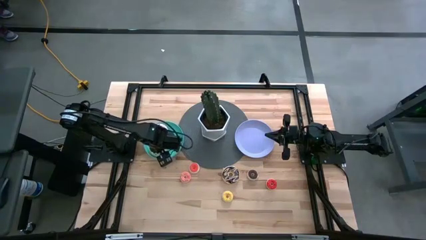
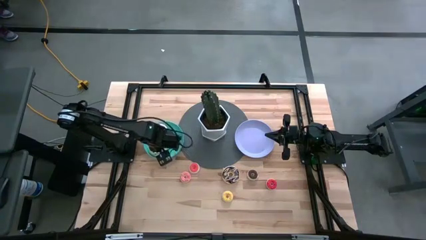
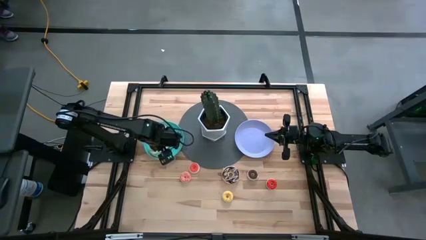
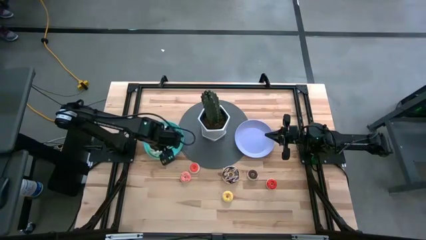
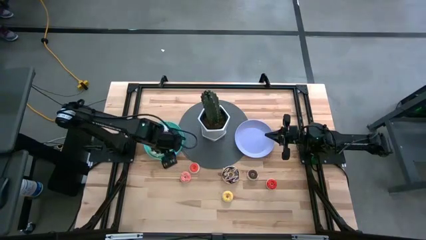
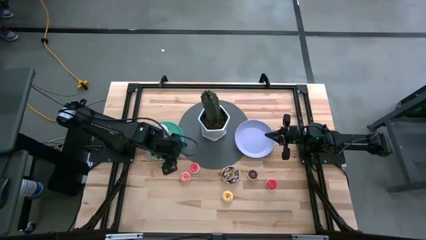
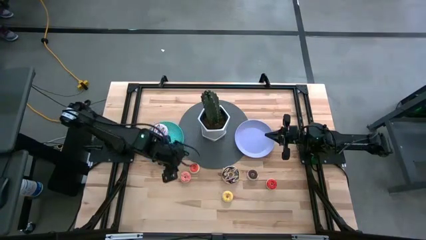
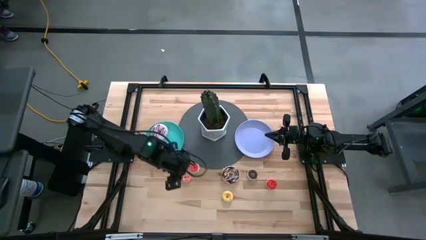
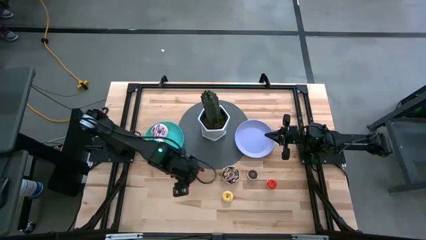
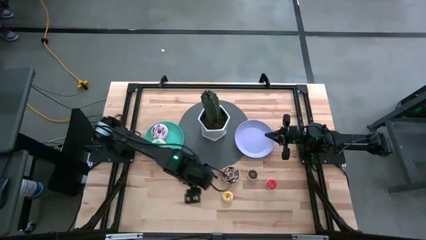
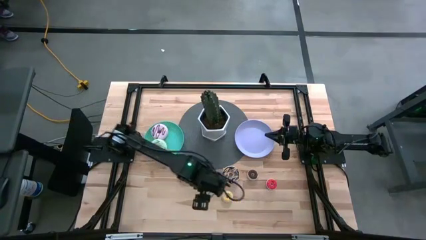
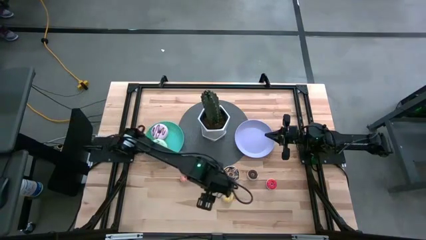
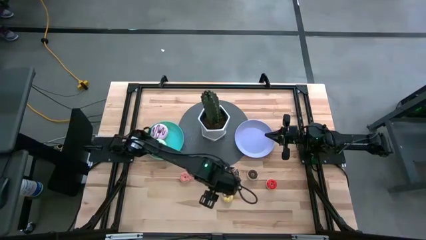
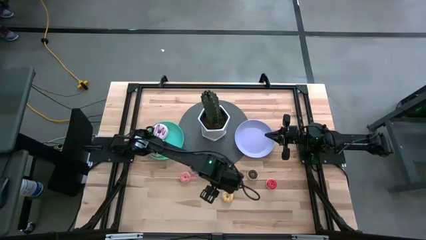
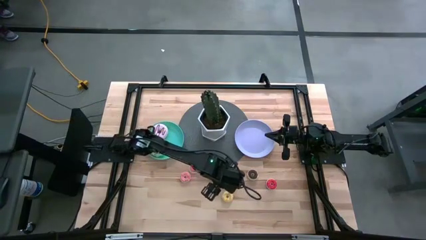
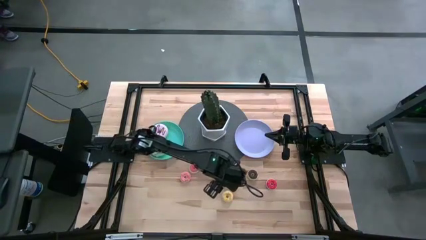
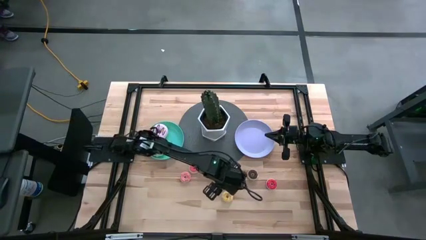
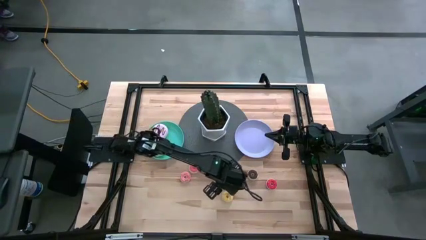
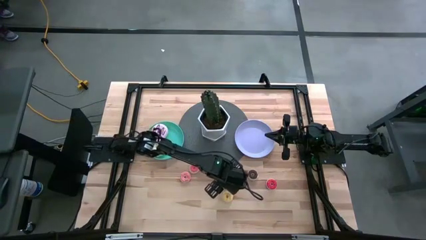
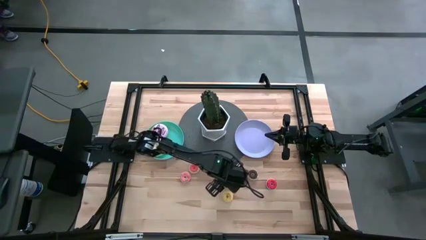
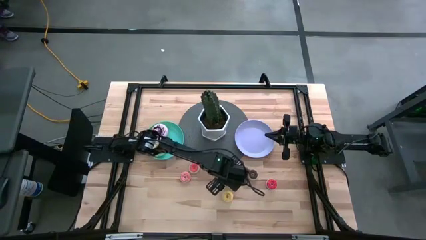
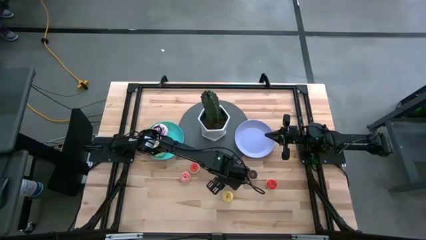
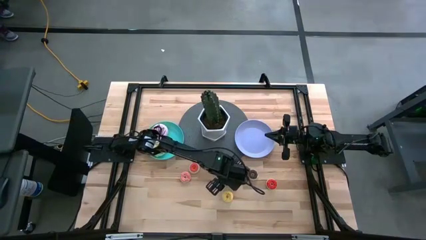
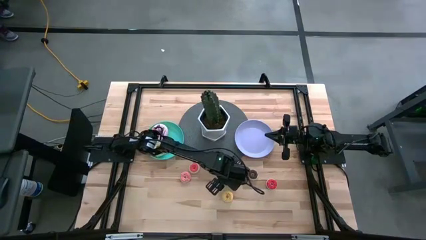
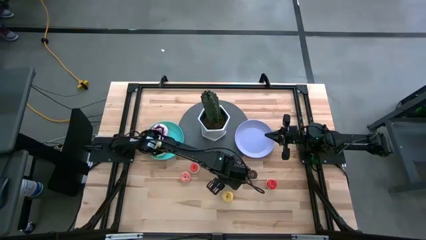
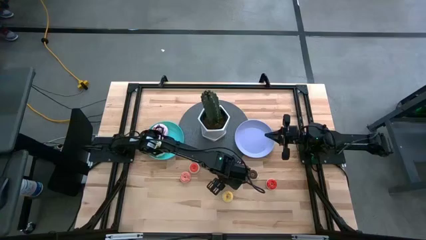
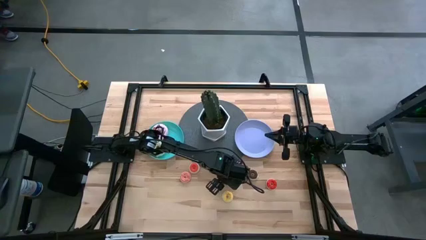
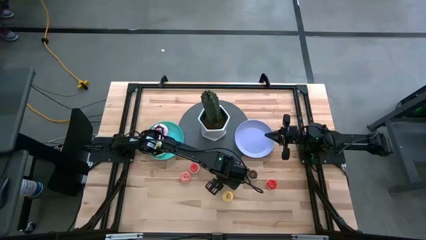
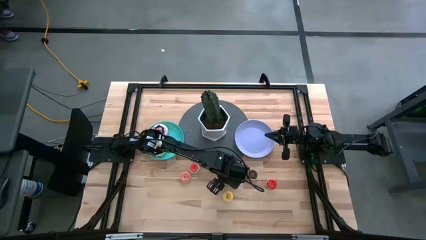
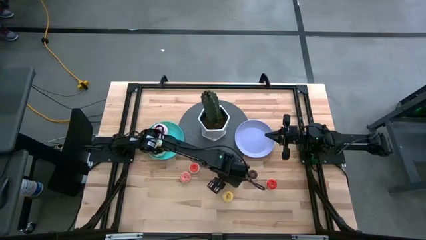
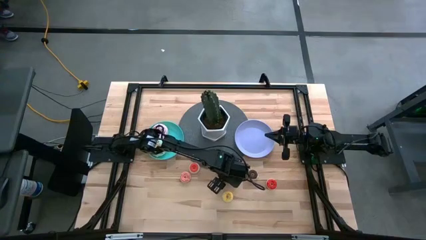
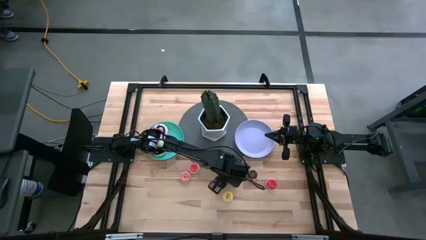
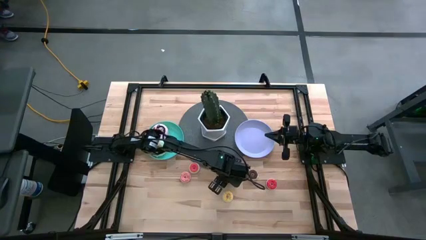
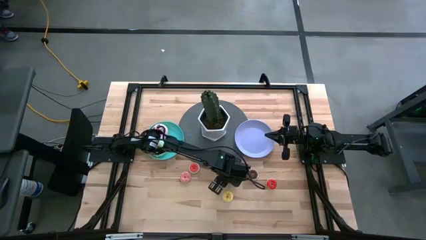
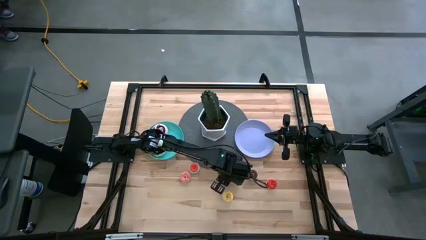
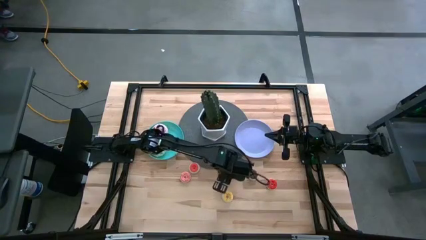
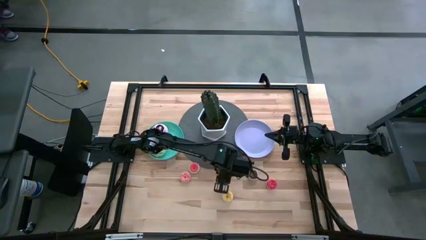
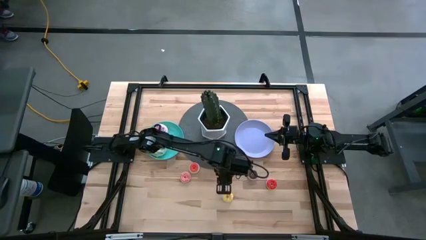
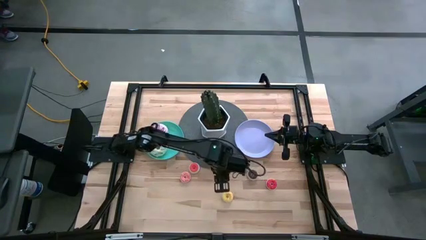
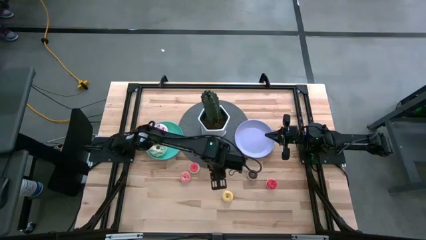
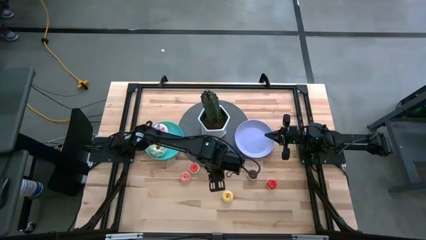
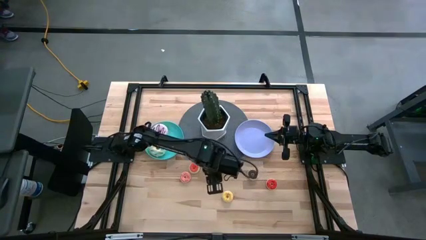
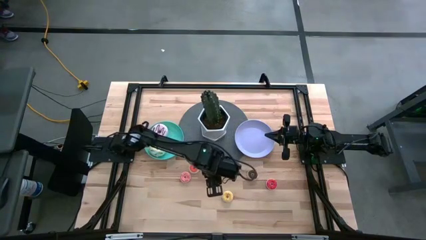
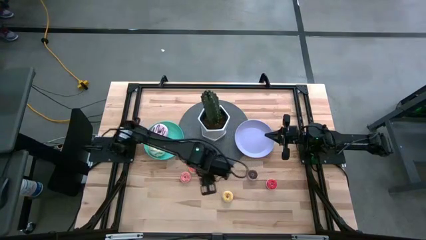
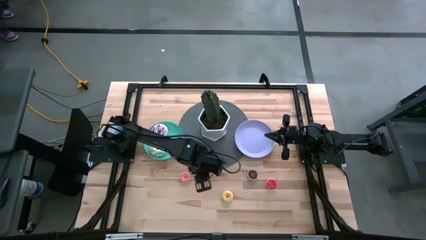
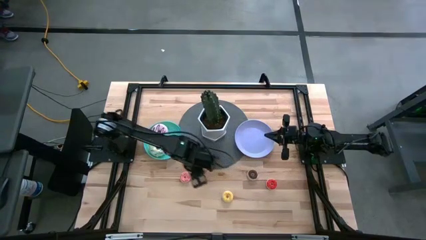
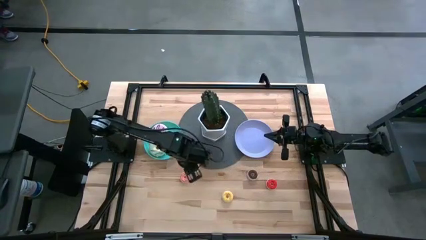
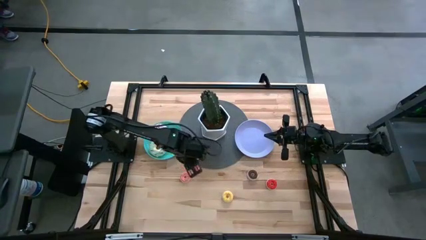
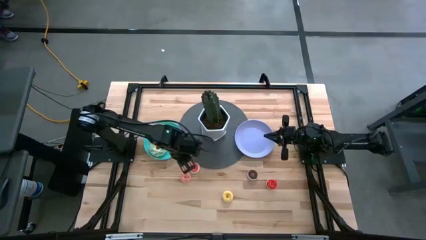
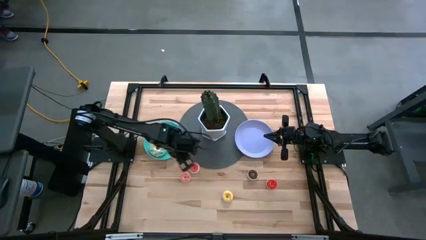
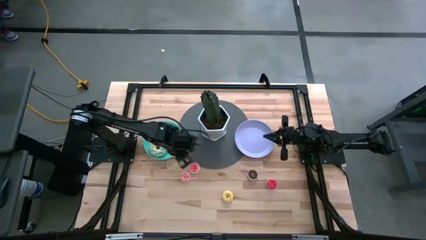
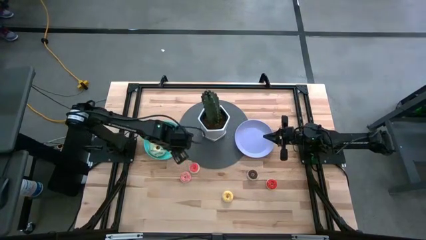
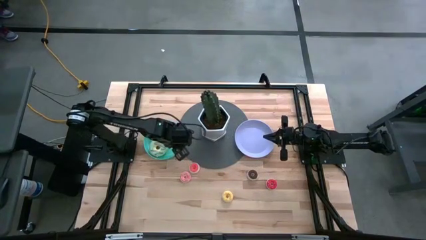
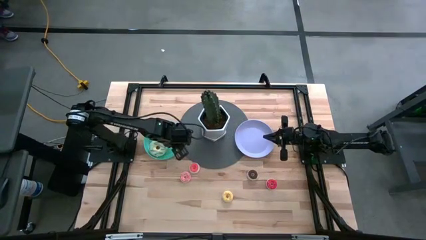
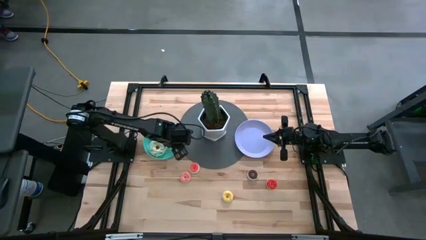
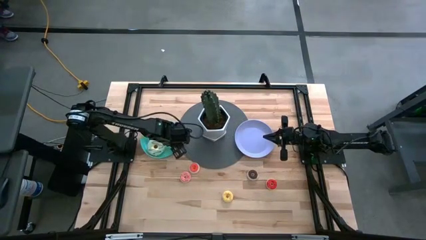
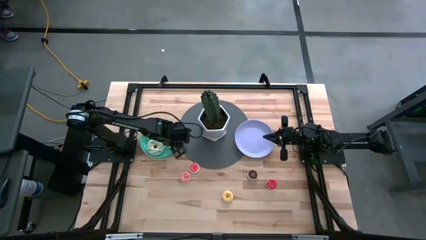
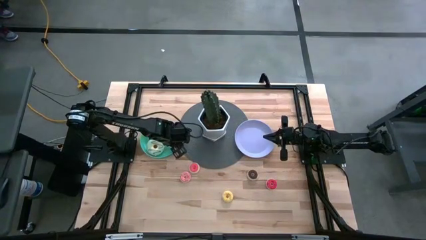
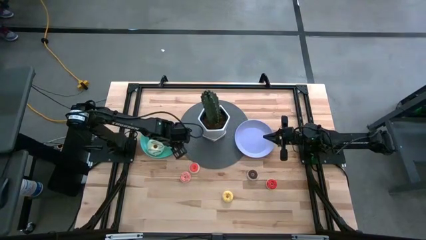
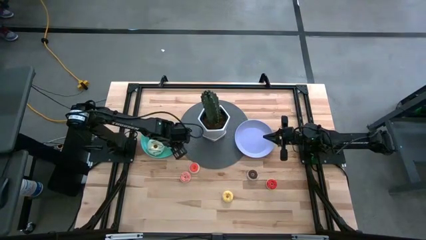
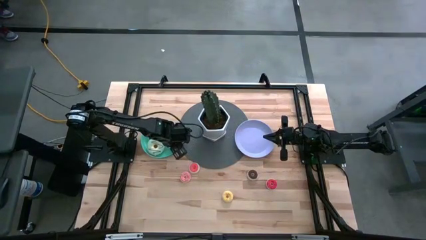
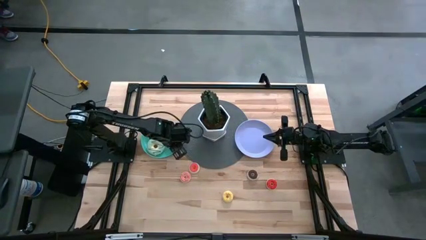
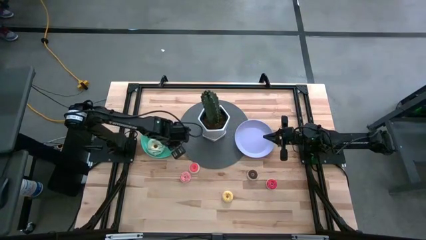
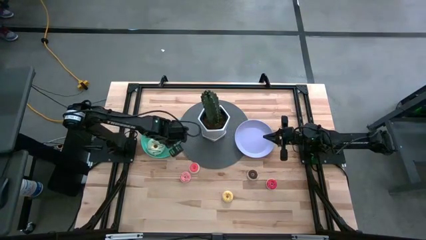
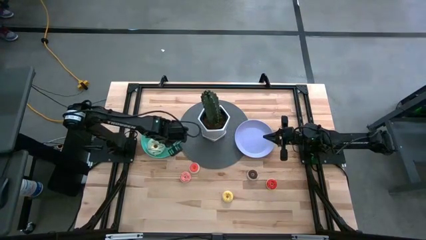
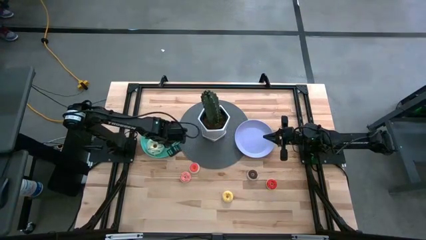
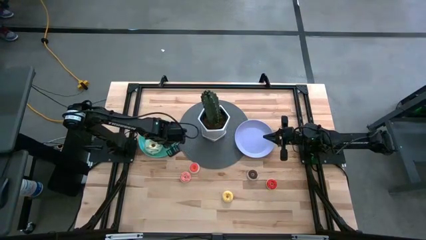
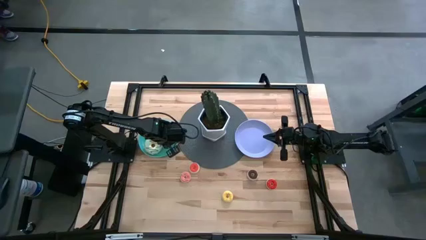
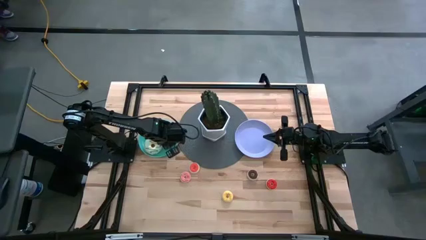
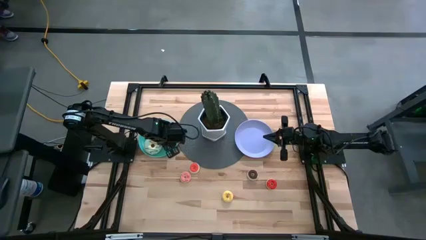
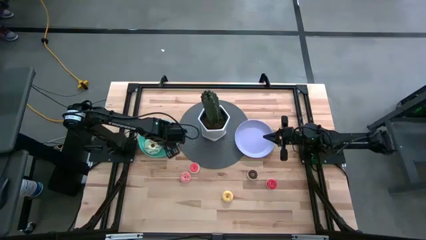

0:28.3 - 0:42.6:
Task: Pick & Place donuts
Put the big black donut on the green plate
